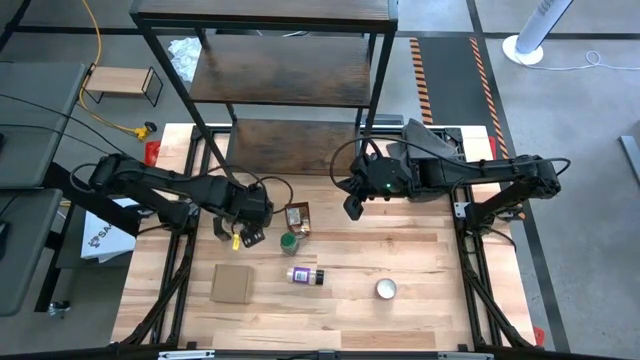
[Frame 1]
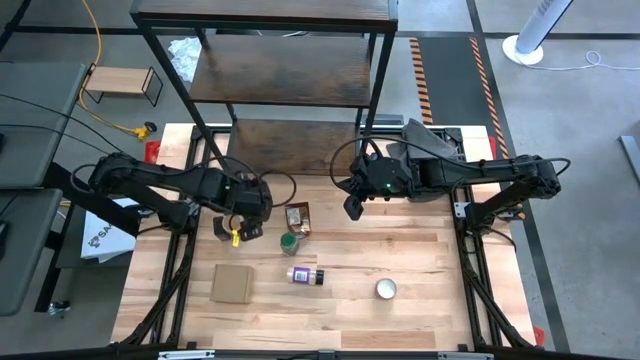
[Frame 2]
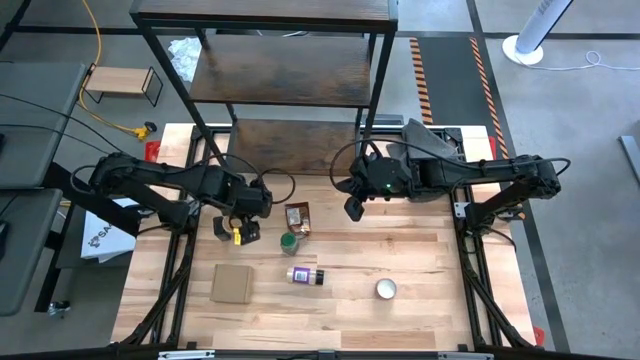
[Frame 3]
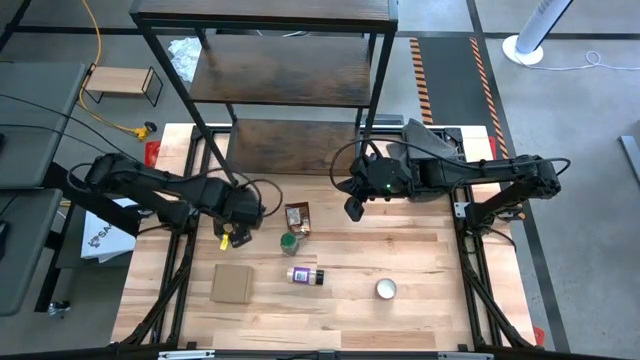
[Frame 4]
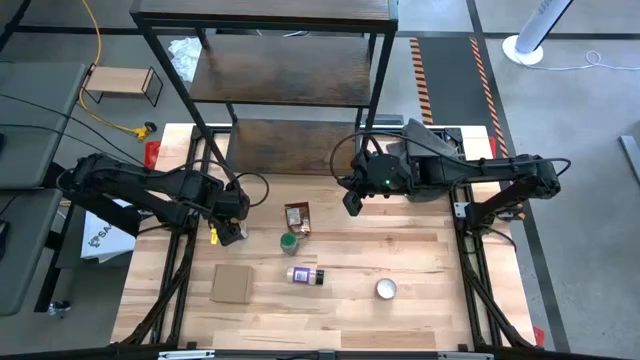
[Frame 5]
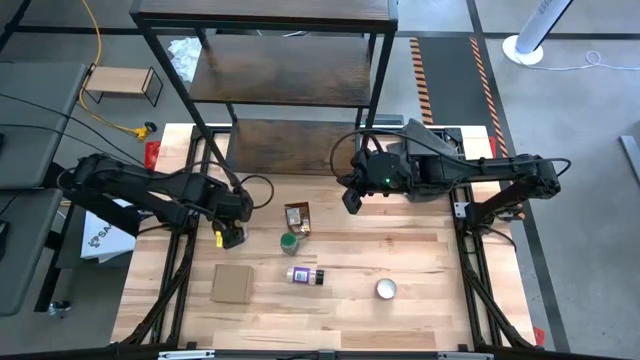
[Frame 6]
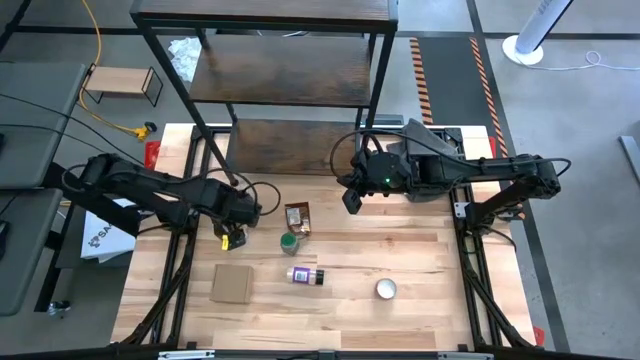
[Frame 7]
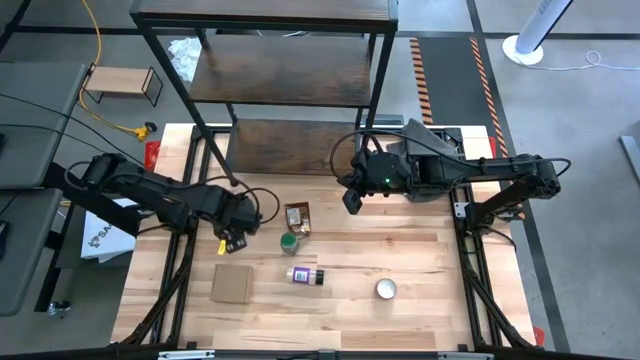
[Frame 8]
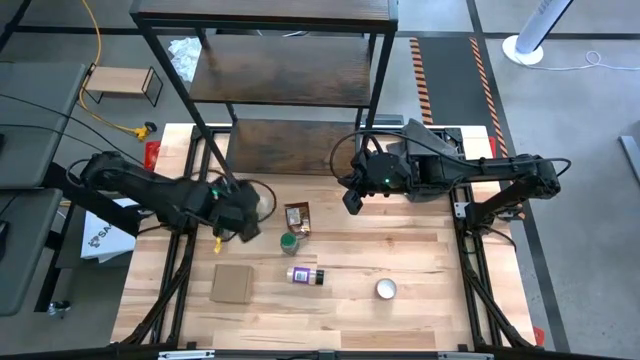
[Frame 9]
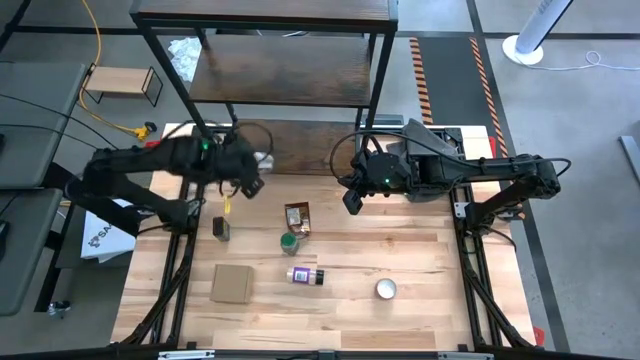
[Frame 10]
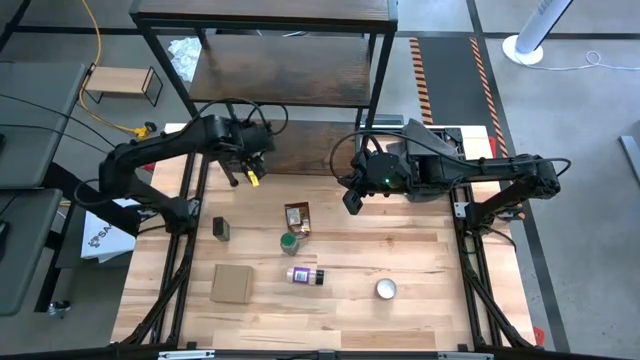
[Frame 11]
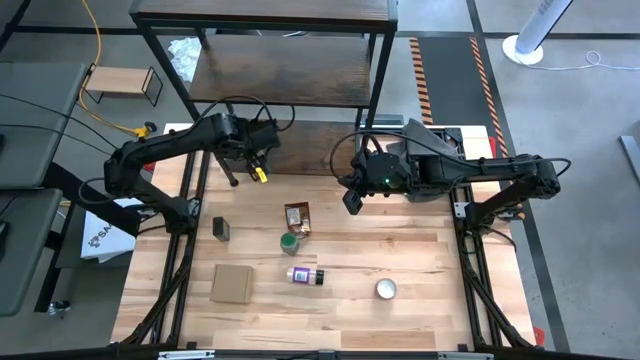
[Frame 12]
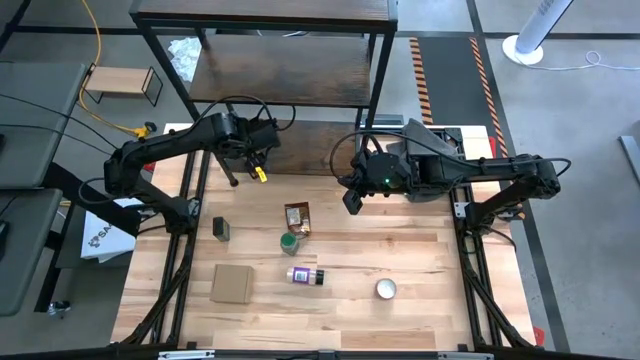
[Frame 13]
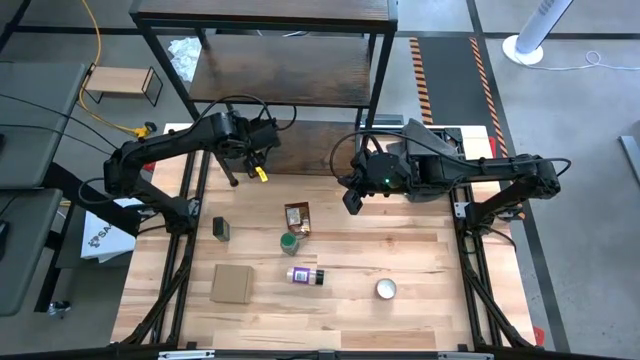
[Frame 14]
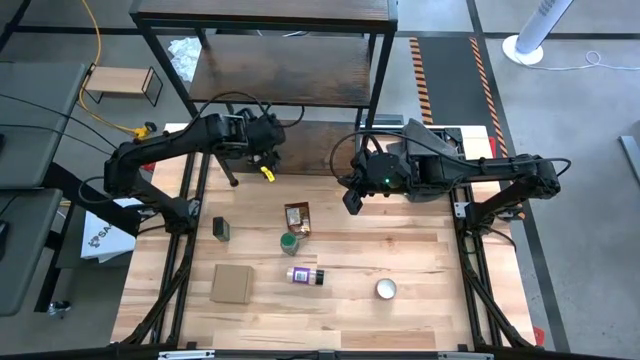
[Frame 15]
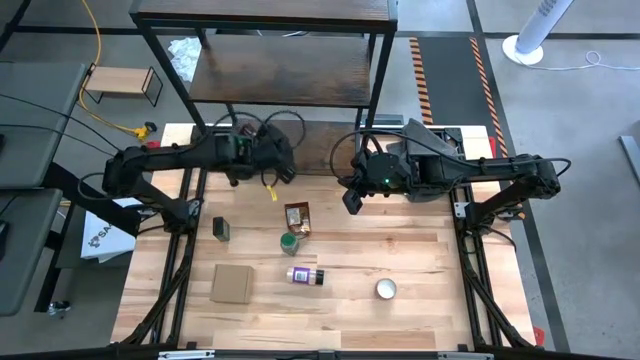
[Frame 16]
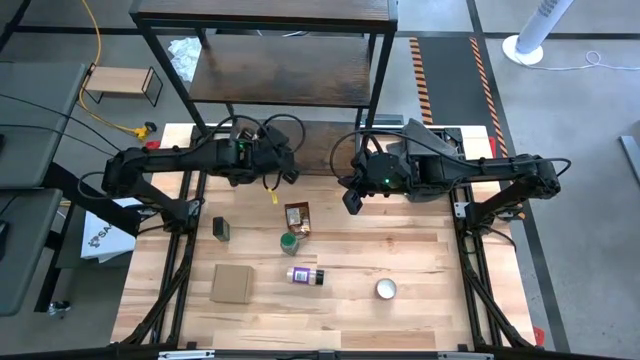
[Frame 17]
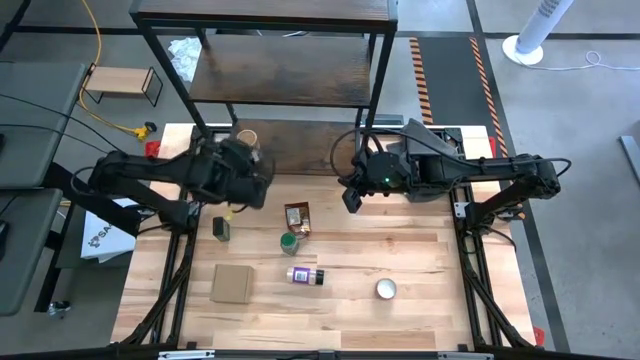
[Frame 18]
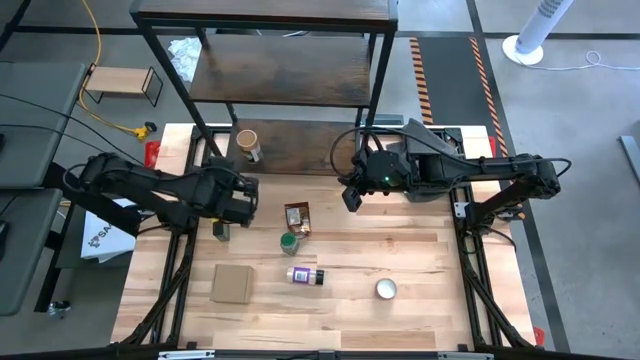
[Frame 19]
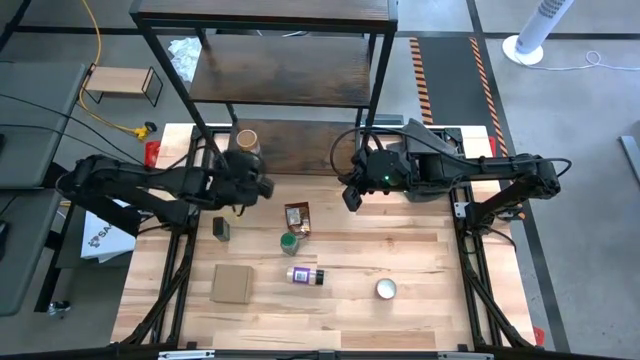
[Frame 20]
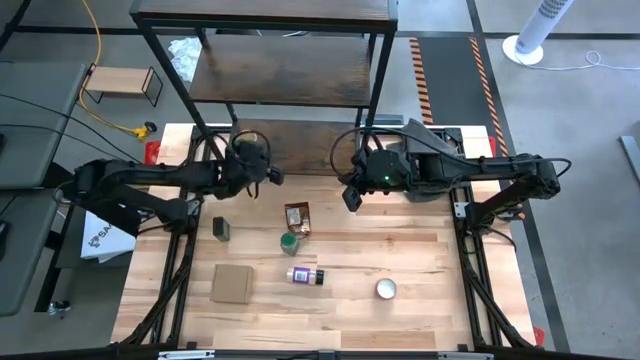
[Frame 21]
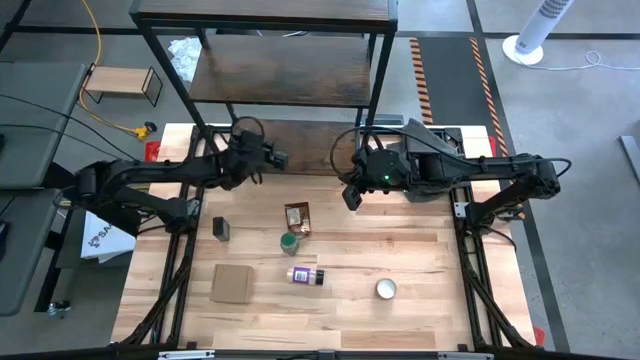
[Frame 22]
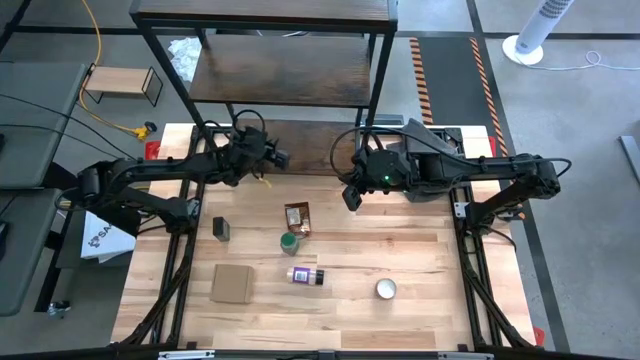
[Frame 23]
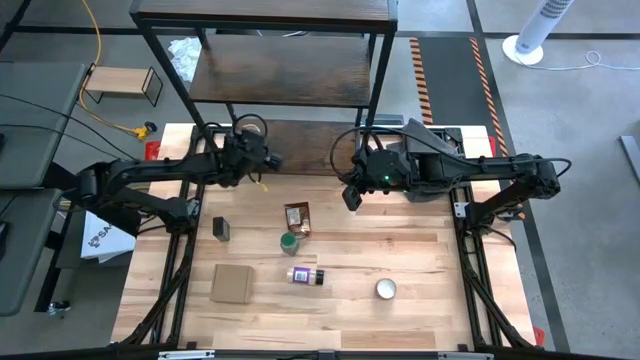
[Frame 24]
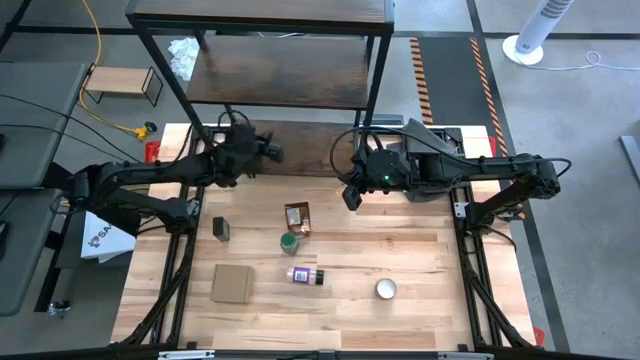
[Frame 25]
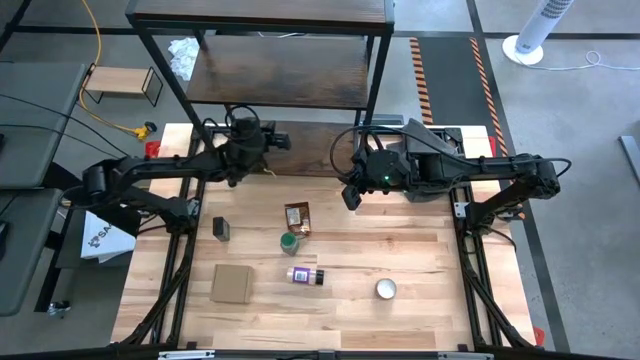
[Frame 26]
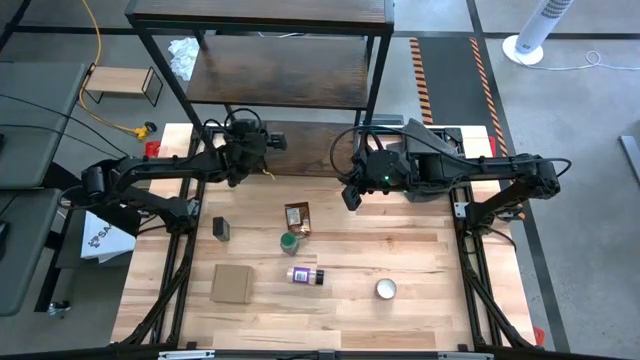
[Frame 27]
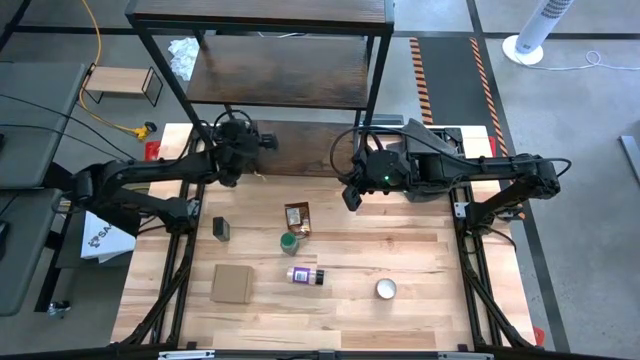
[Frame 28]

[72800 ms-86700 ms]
Task: Shelf spices
Put the gold seasoning bottle on the shelf

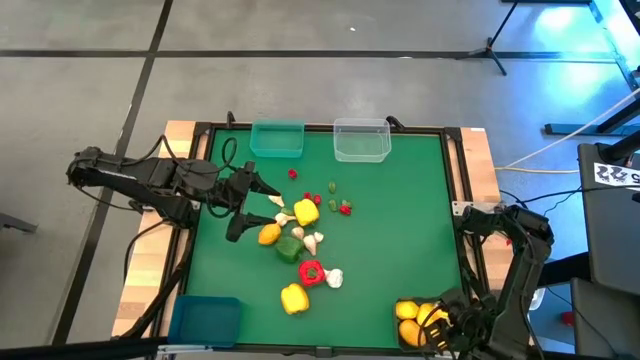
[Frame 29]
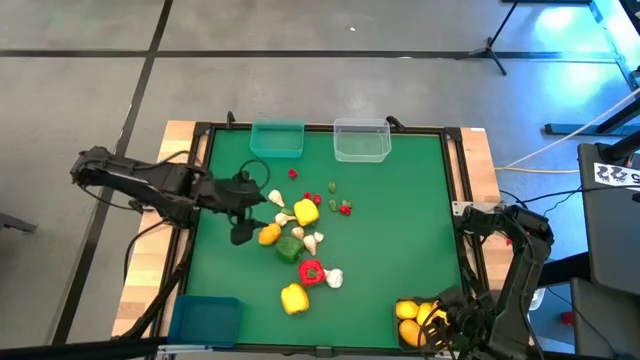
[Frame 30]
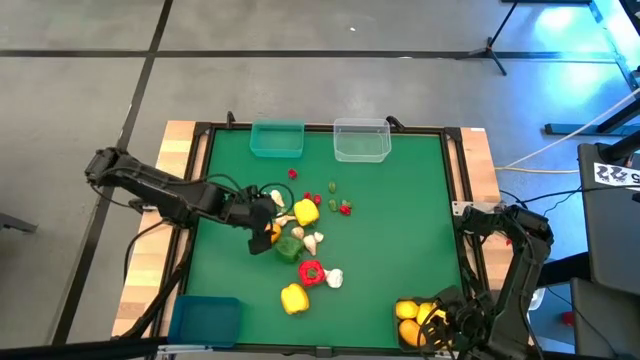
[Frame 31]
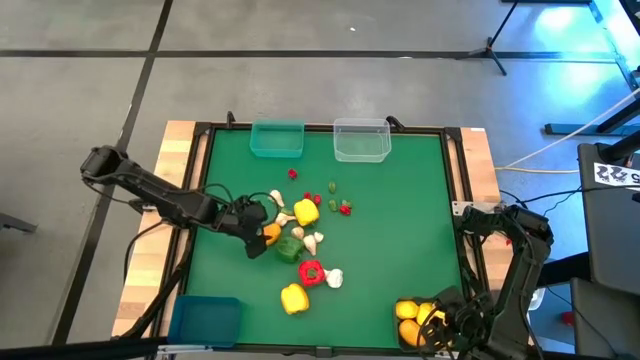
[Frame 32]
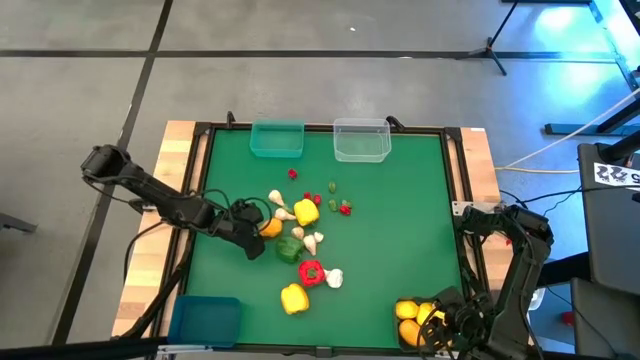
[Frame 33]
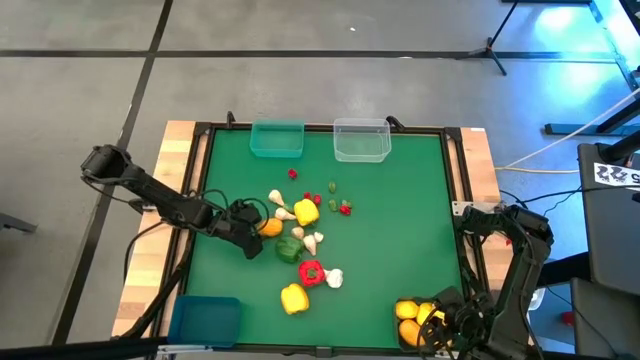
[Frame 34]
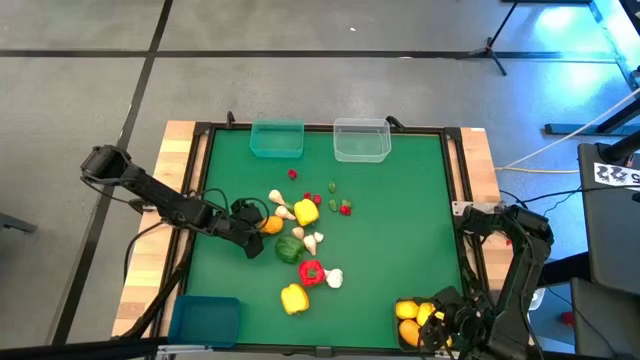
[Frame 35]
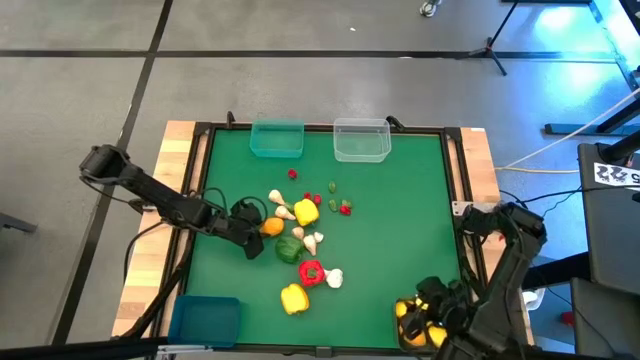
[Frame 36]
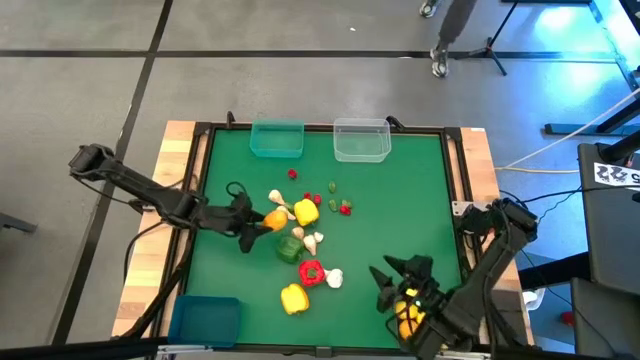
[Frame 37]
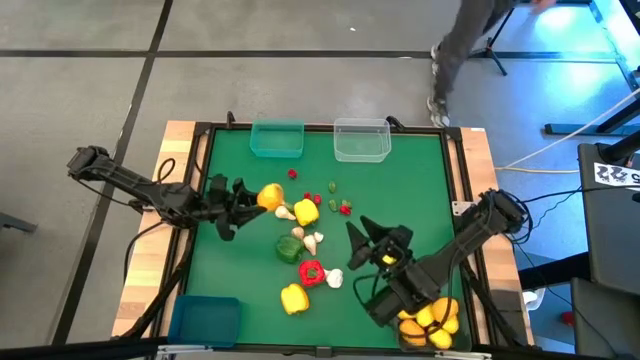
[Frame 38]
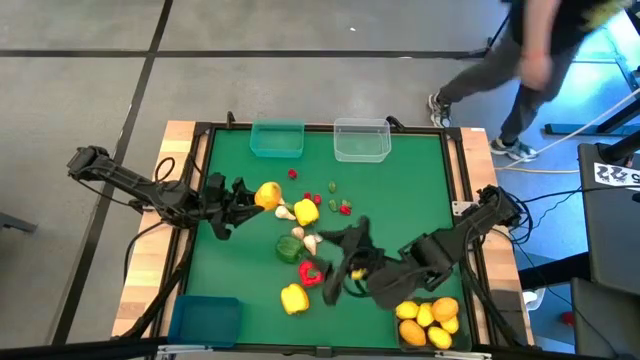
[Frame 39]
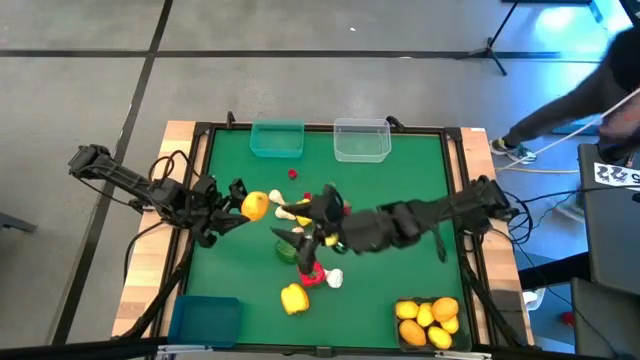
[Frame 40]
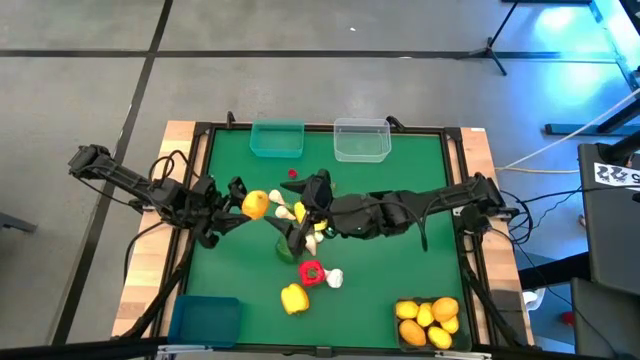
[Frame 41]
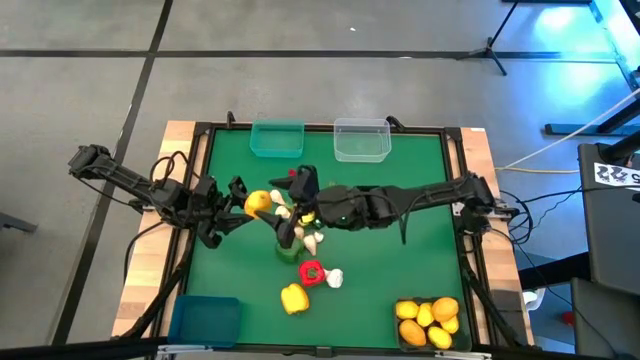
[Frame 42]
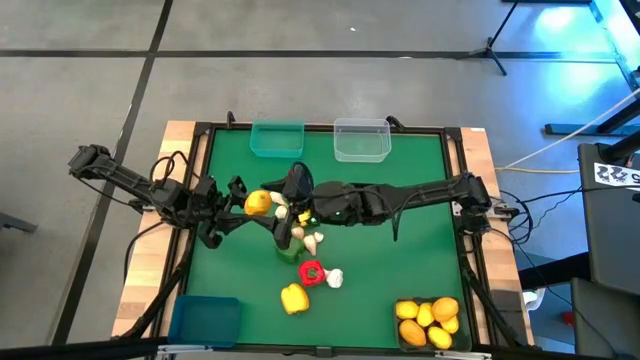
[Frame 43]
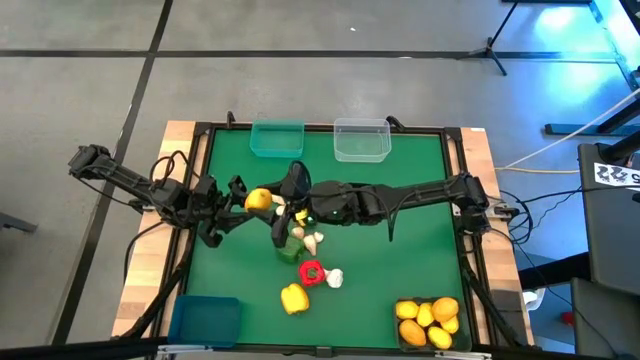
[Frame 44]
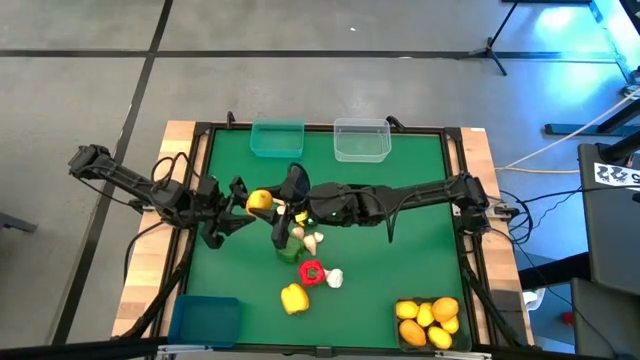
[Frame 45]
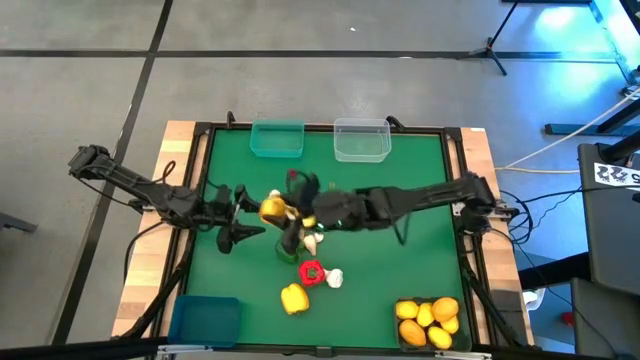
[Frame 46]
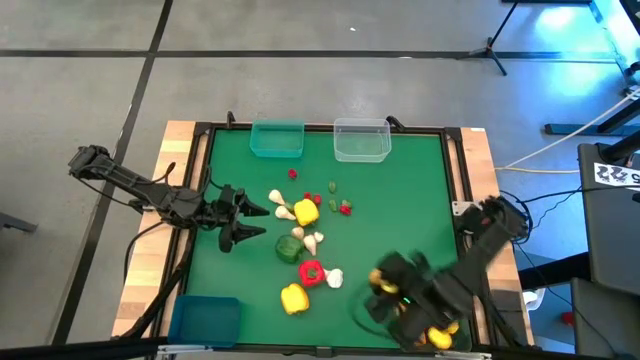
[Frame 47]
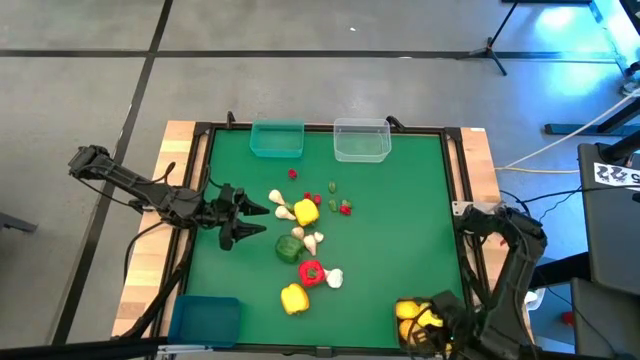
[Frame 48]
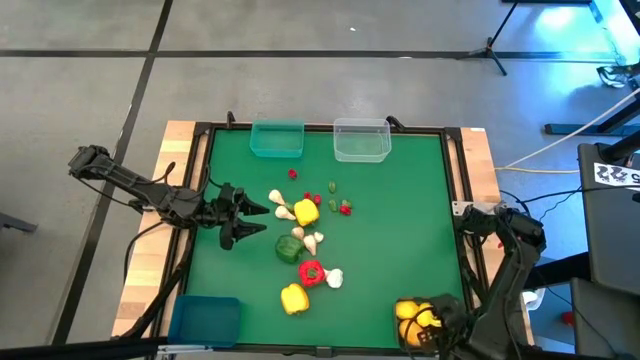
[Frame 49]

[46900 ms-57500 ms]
Task: Sort produce into baskets
Put the lemon into the black bin
